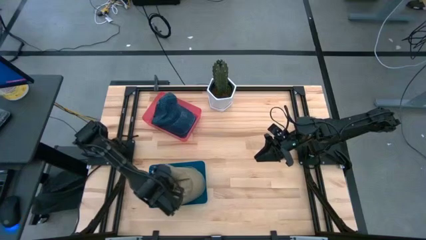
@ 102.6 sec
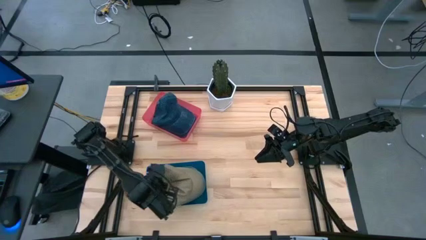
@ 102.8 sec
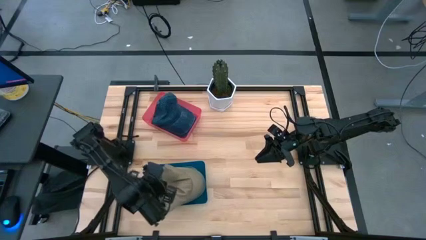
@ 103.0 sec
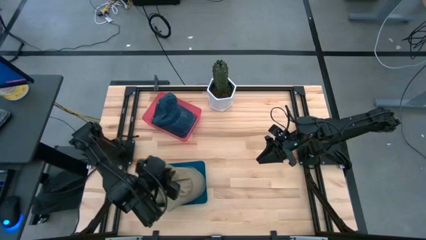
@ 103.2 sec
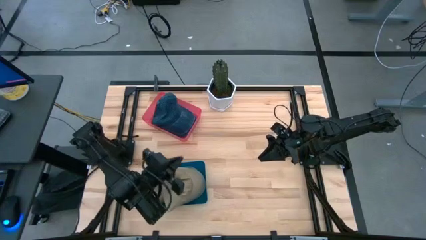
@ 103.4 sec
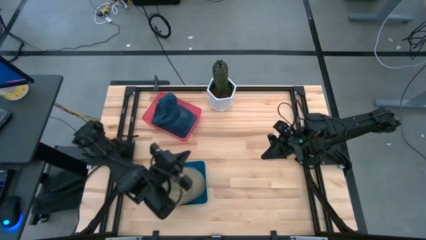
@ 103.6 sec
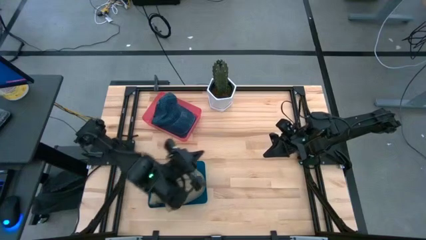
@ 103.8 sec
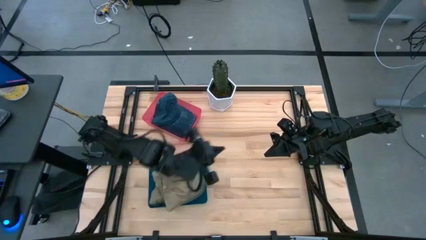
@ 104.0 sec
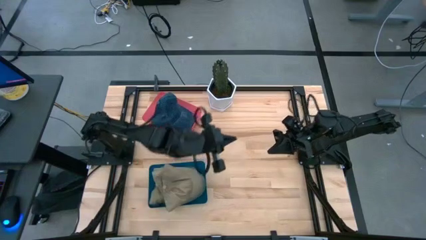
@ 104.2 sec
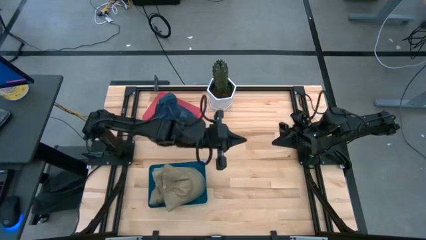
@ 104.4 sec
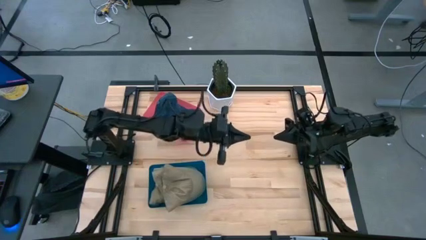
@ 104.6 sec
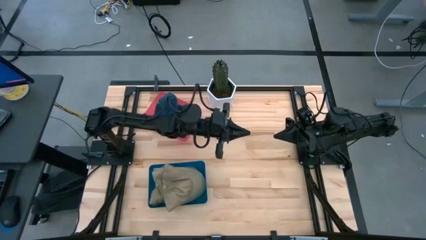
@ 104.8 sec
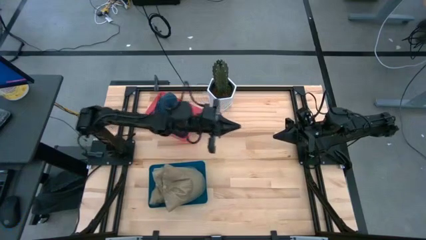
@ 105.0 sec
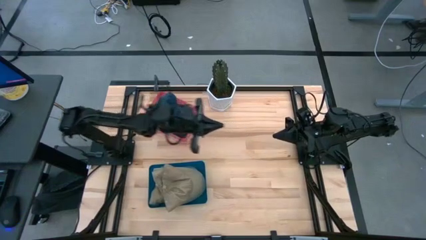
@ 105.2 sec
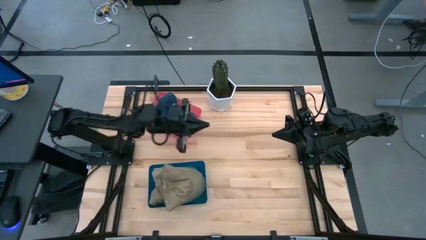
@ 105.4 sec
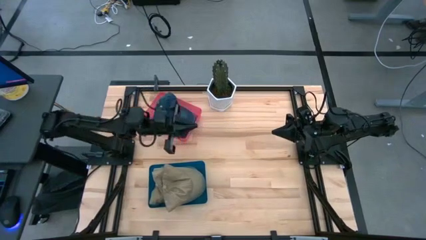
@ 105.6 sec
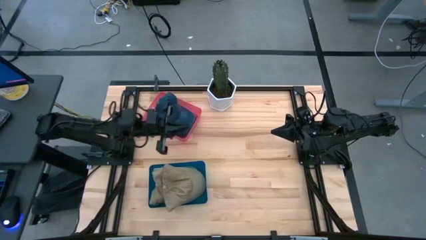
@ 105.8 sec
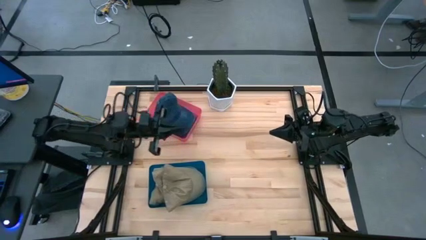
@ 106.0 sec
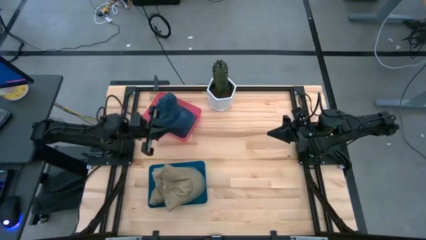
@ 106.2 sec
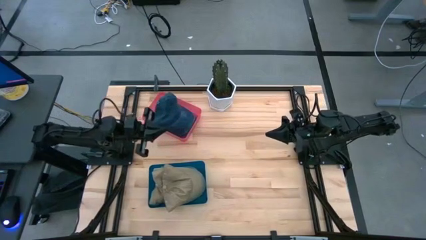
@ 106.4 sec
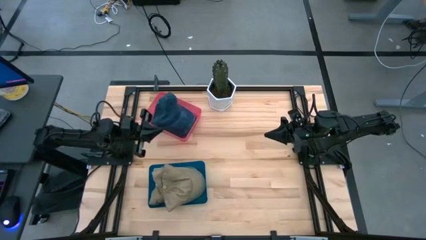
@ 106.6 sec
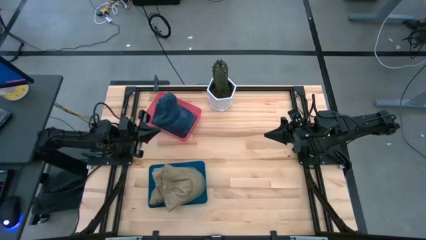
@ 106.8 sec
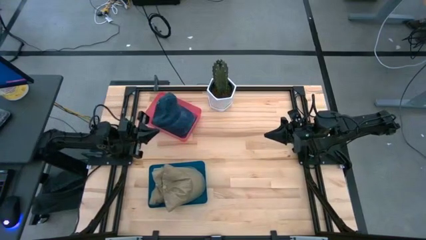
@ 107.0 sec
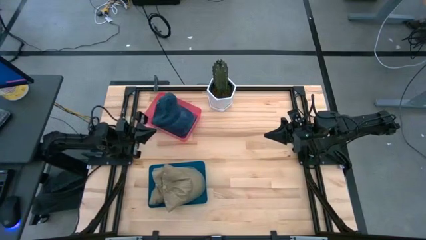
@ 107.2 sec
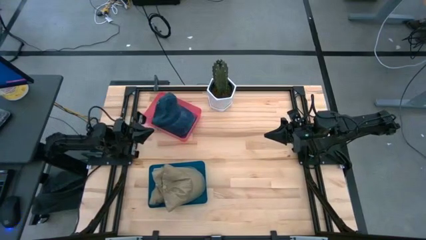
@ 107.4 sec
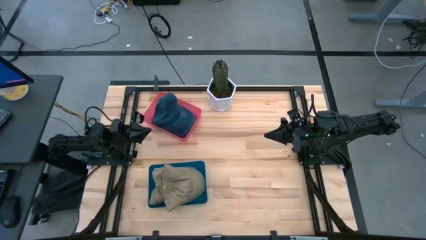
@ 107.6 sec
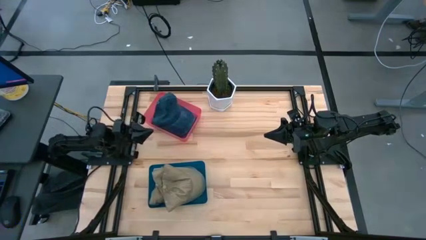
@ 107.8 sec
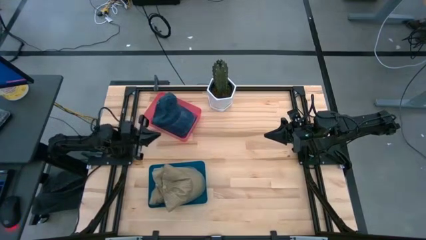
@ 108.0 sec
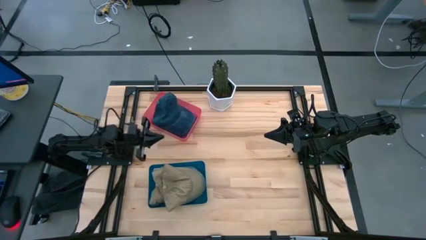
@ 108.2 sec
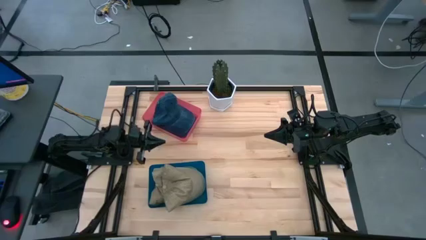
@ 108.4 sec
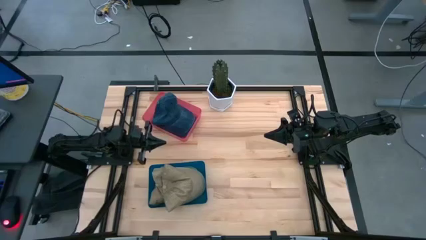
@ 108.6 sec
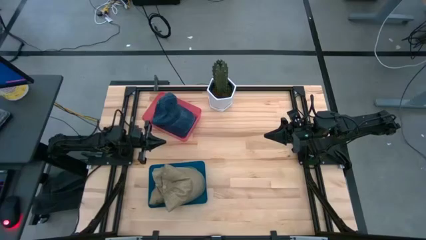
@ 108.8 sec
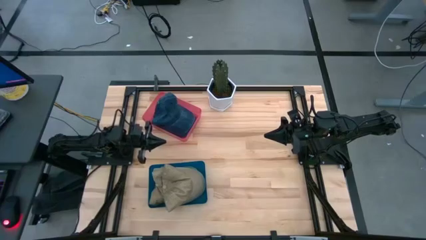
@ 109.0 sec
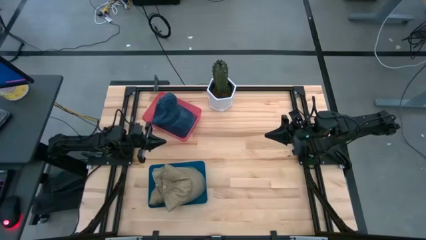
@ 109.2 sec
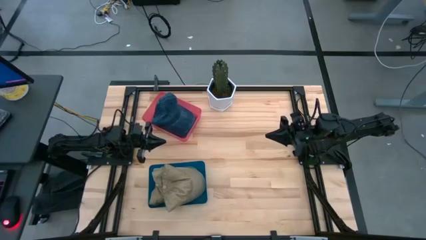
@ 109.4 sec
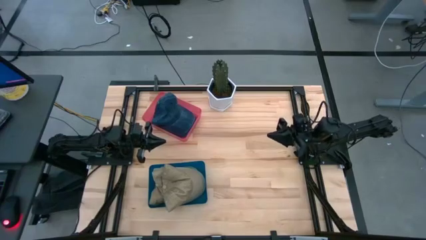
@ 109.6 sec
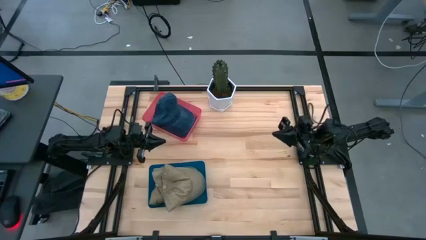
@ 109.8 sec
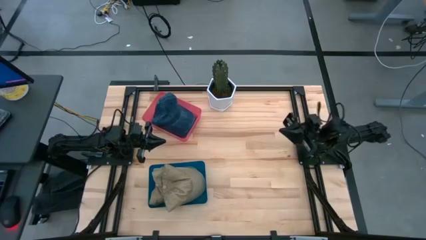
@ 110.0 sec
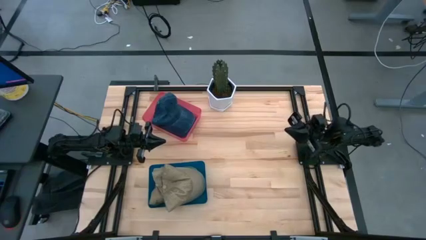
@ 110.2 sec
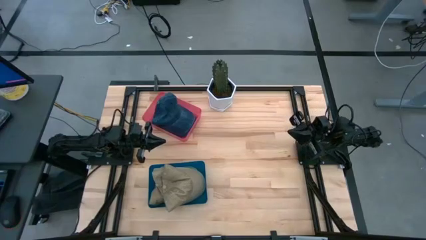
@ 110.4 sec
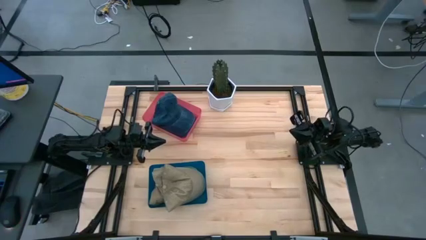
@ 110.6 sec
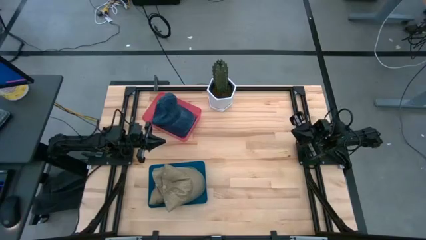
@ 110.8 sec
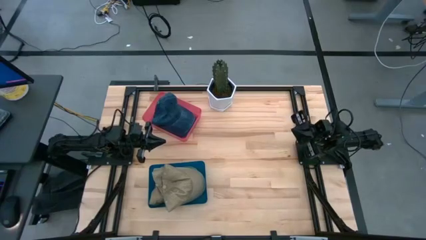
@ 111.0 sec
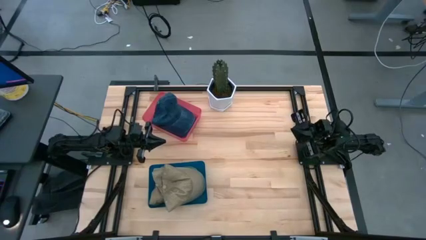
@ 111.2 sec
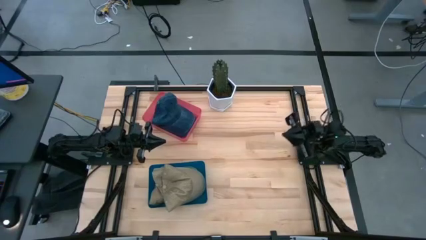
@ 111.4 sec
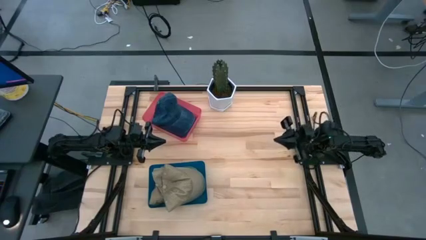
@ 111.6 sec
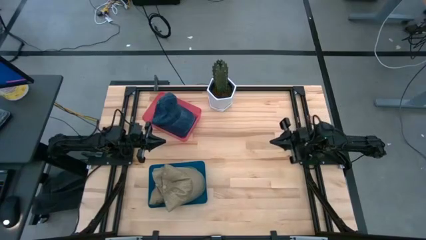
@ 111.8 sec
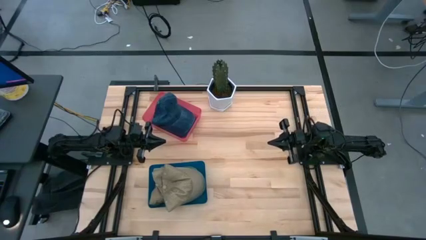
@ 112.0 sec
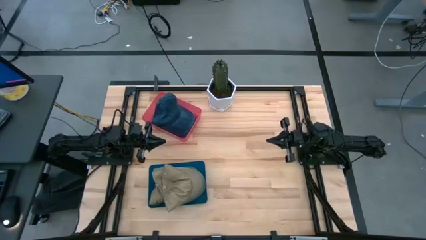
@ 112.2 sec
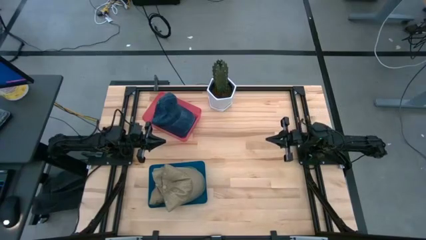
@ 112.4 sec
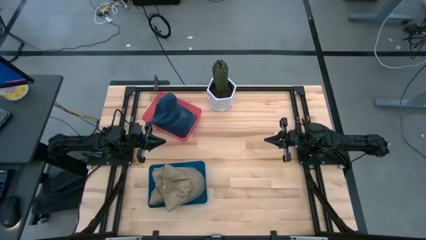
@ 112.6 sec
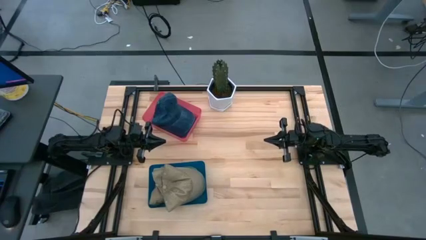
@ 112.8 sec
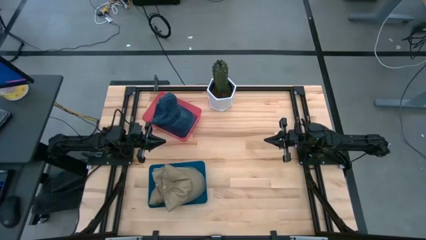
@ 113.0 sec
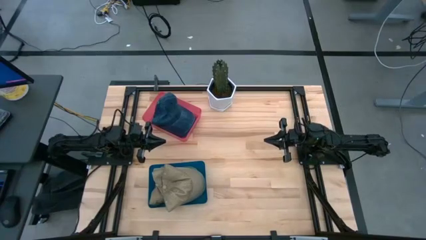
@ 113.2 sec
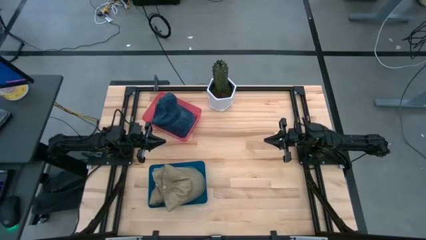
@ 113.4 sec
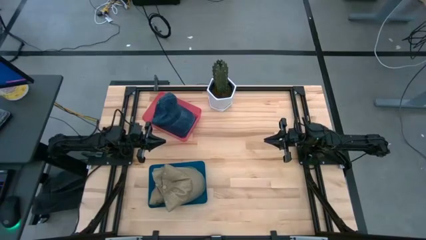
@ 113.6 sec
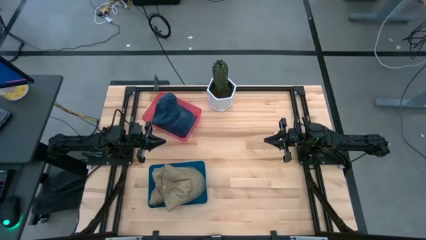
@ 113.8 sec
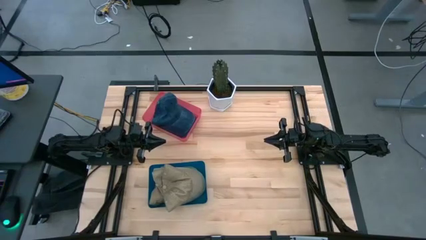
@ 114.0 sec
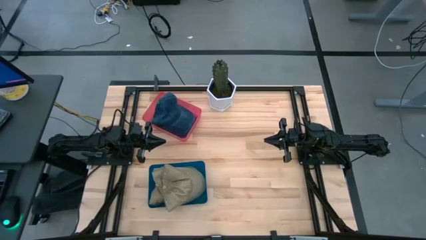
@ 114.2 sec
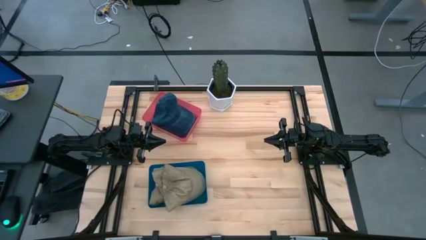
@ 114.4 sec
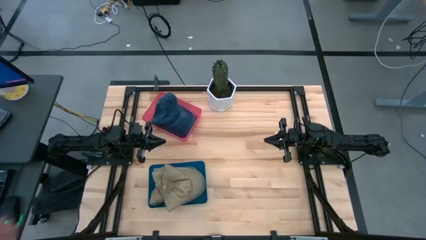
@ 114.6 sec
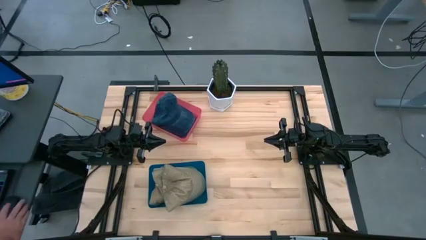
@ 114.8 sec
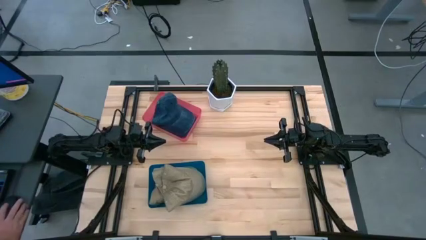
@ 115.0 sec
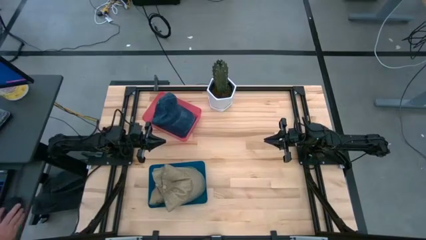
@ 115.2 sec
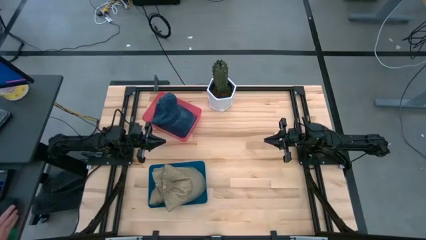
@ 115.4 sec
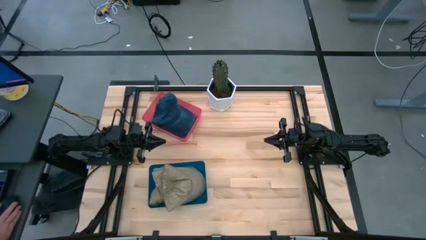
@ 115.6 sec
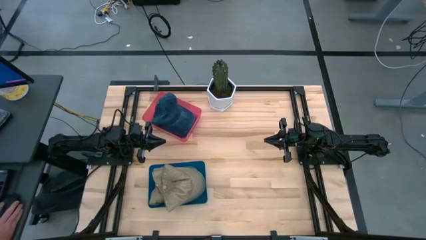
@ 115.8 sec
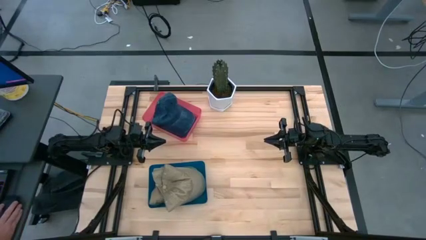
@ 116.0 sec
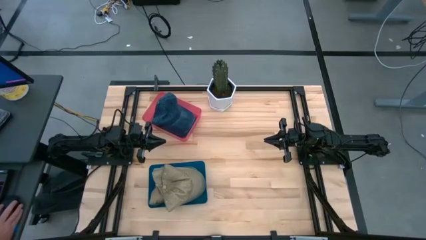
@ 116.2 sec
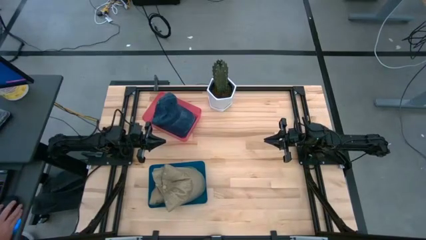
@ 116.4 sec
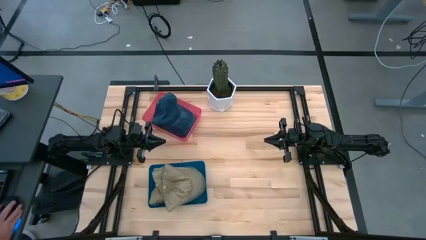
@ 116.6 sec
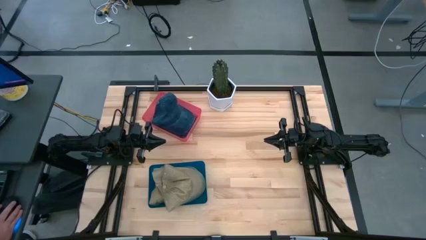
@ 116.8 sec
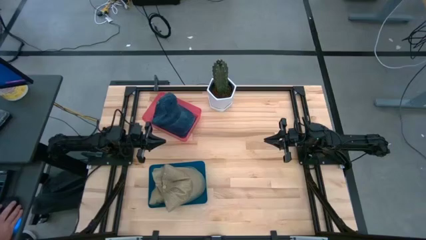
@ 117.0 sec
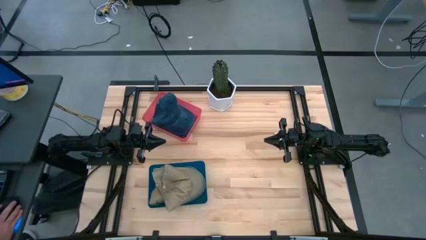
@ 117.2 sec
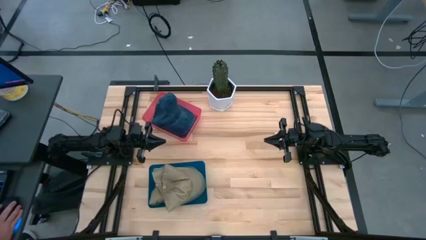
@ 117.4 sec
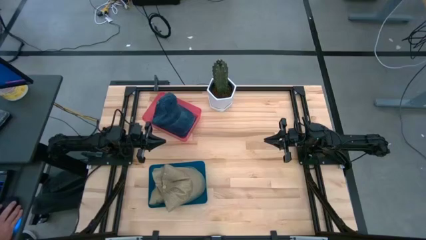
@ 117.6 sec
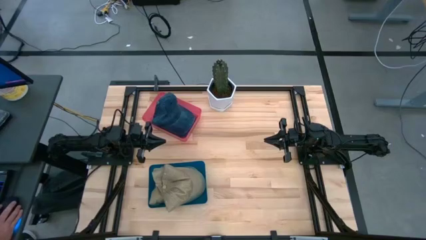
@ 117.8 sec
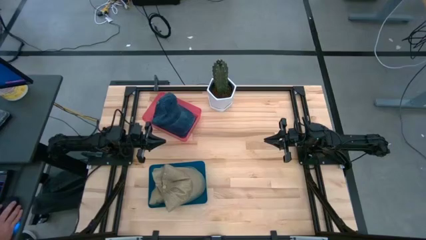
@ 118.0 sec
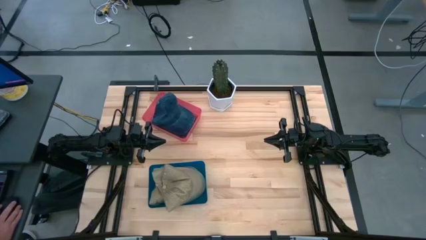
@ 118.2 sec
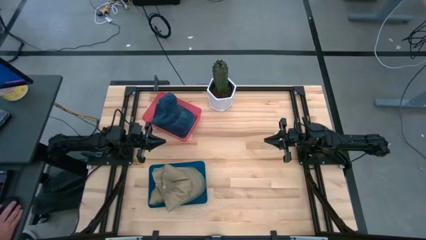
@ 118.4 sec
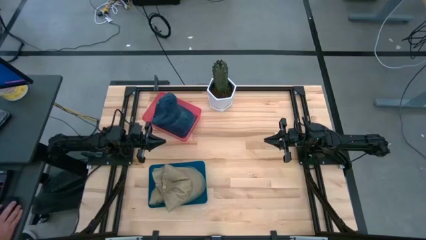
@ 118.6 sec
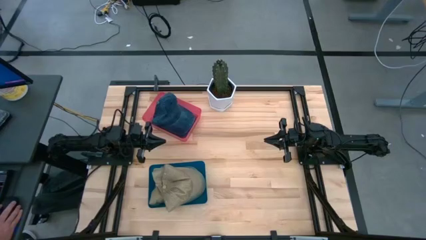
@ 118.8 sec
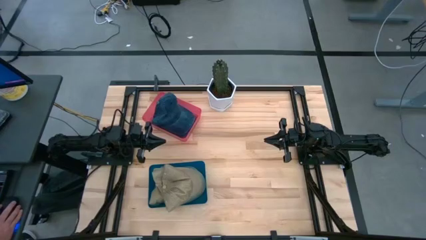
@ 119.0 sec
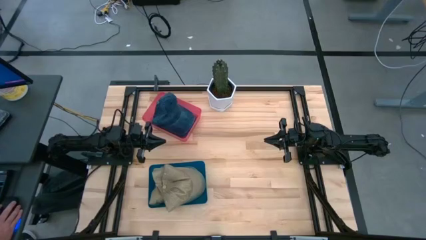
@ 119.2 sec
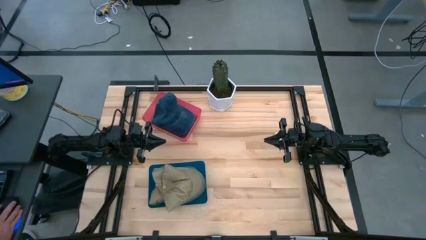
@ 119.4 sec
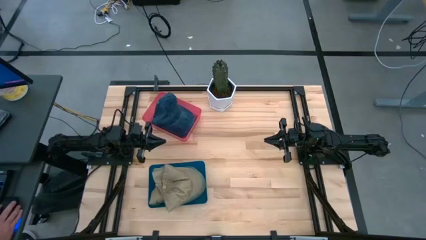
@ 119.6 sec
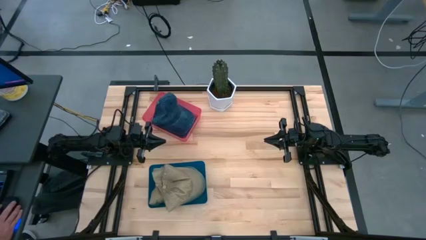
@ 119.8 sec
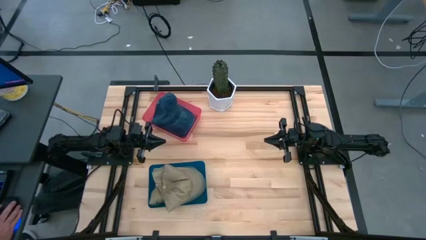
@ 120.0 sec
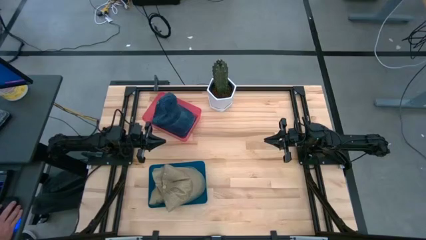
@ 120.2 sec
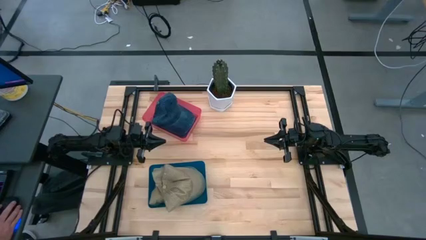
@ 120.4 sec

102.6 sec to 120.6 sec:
Task: Pick & Place hat
Return to Home Position
